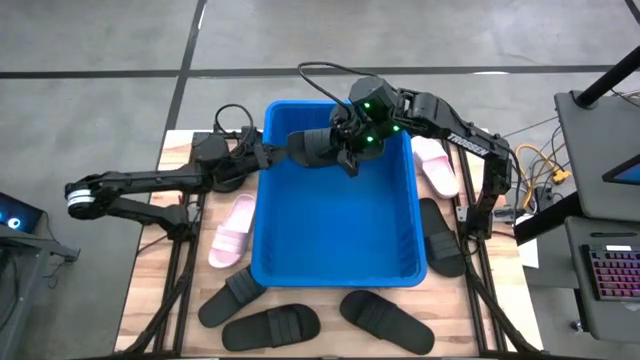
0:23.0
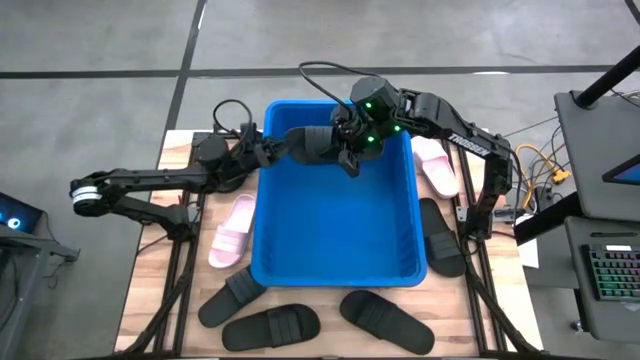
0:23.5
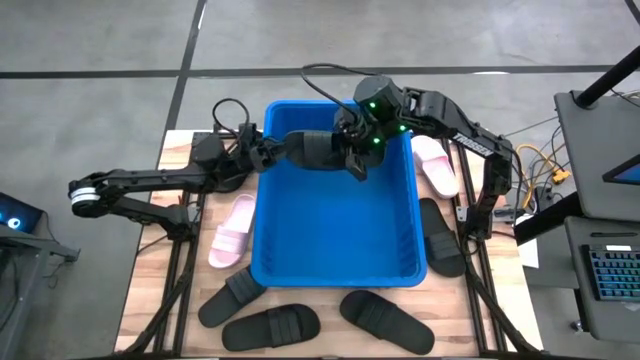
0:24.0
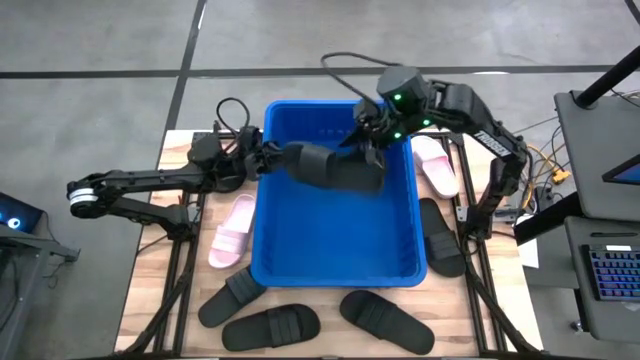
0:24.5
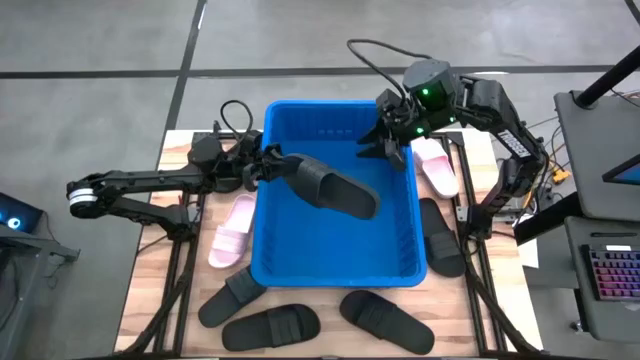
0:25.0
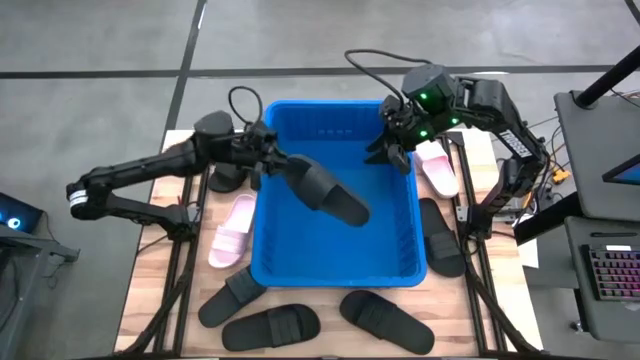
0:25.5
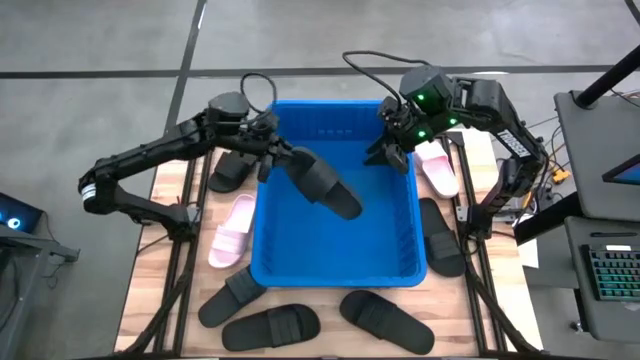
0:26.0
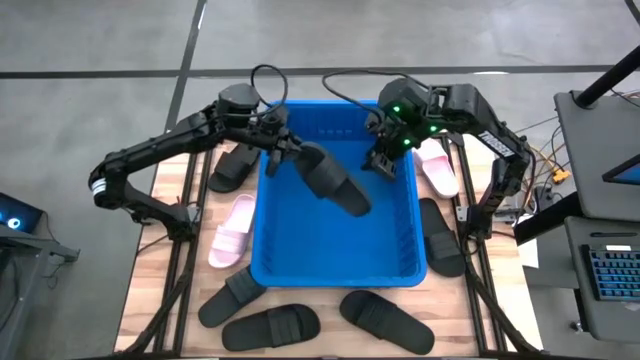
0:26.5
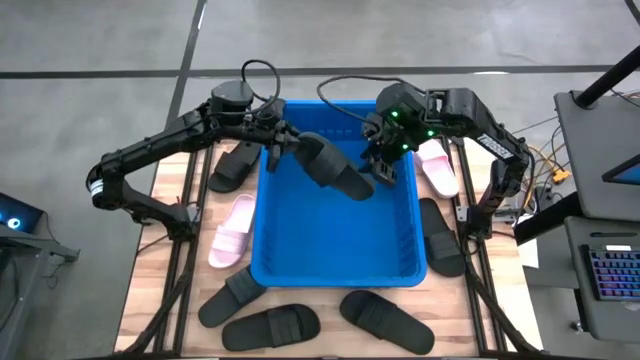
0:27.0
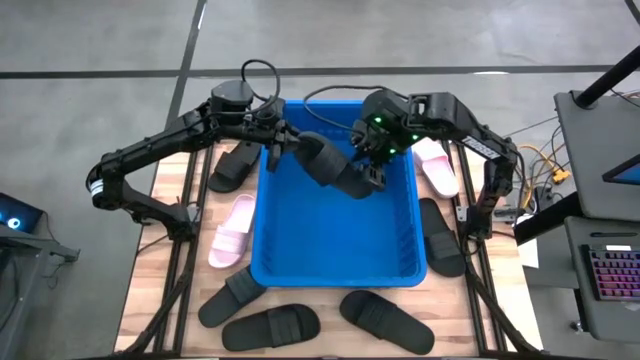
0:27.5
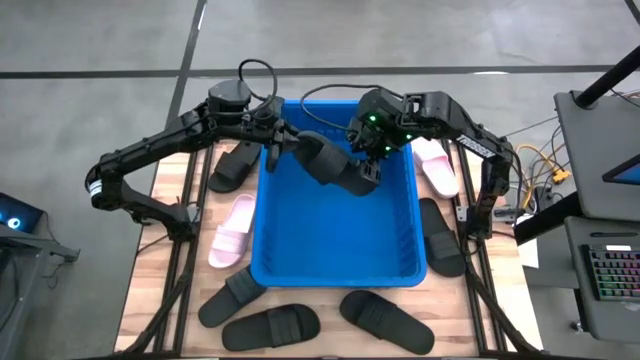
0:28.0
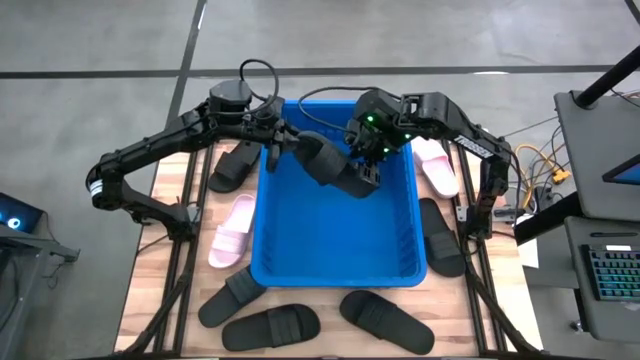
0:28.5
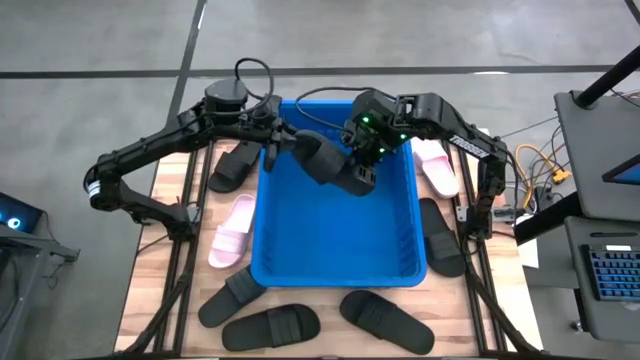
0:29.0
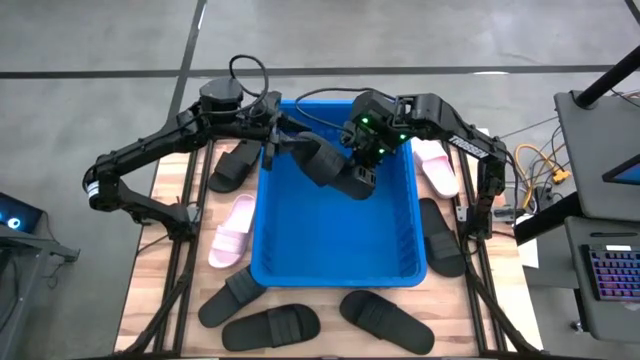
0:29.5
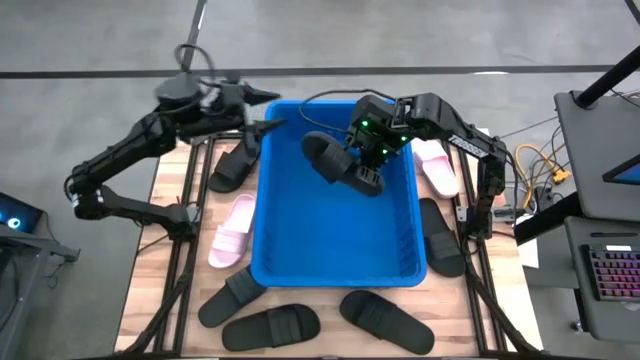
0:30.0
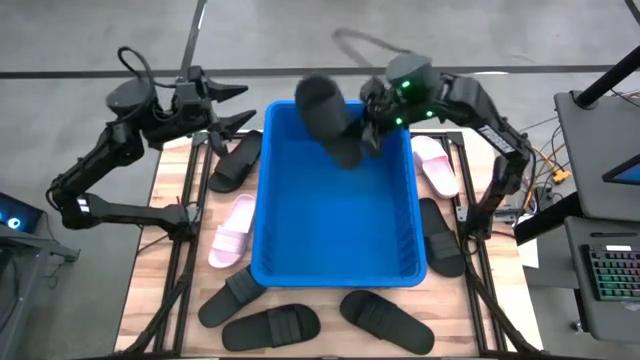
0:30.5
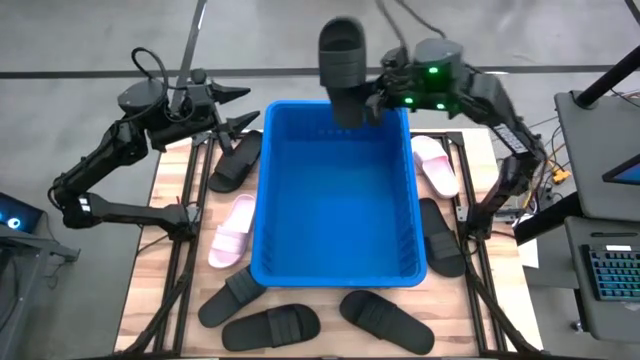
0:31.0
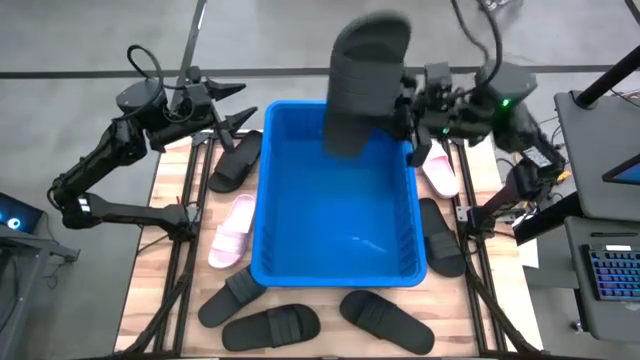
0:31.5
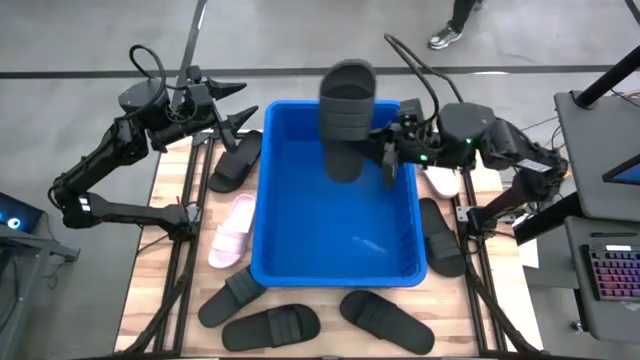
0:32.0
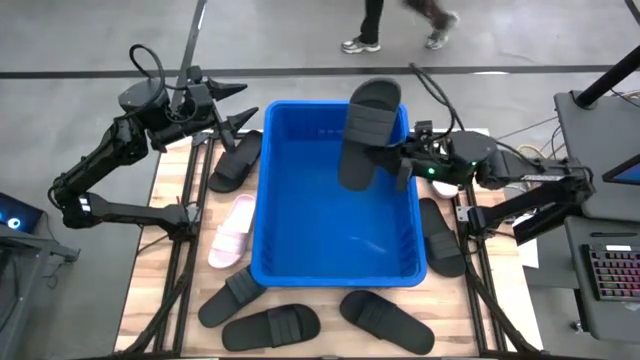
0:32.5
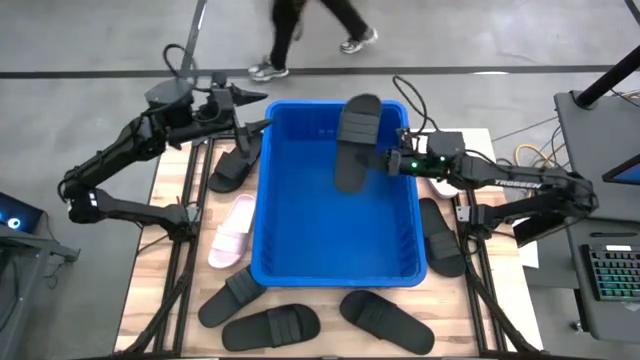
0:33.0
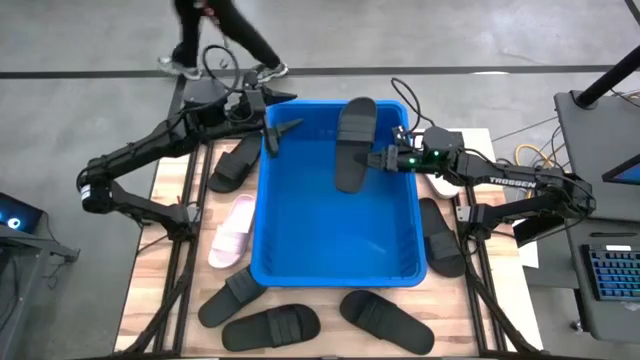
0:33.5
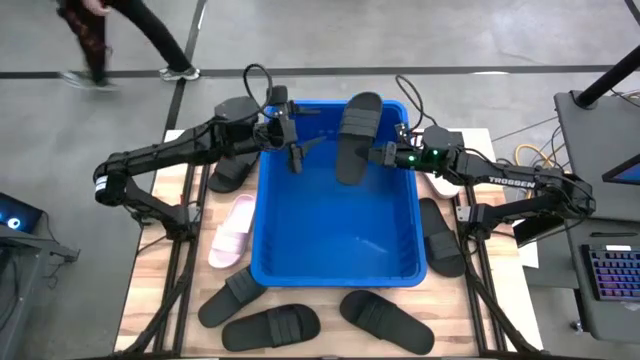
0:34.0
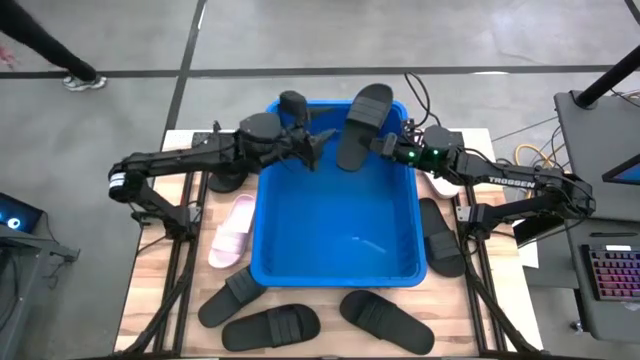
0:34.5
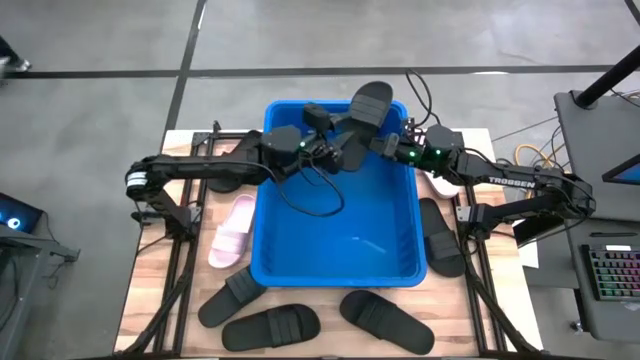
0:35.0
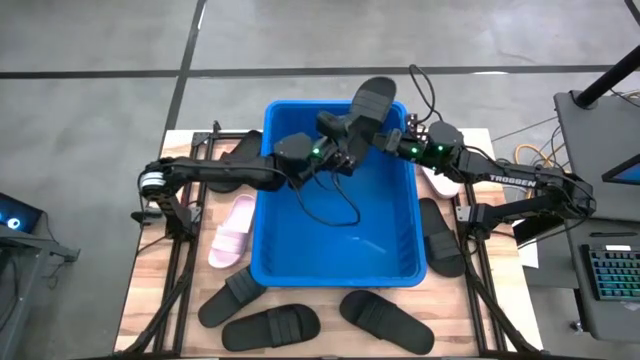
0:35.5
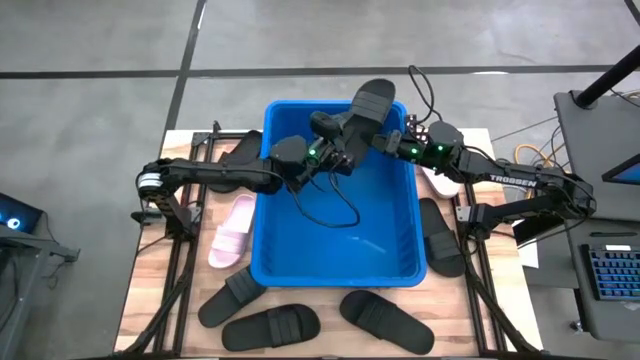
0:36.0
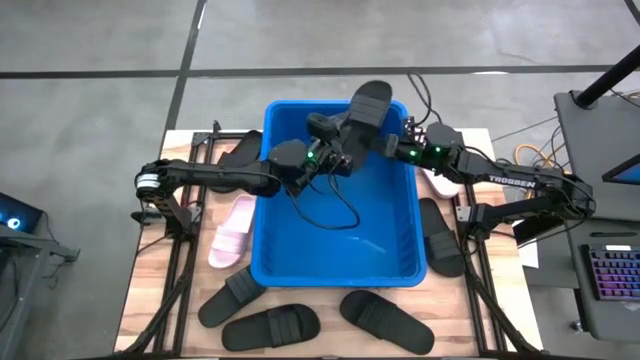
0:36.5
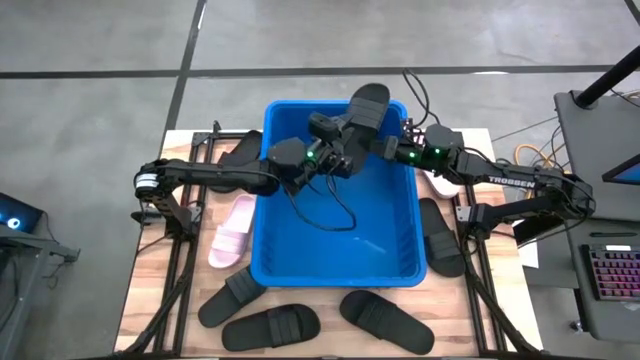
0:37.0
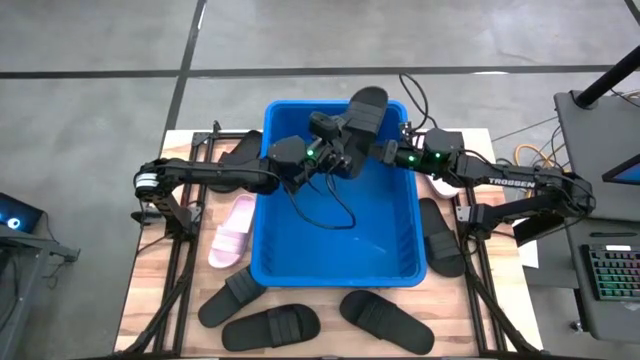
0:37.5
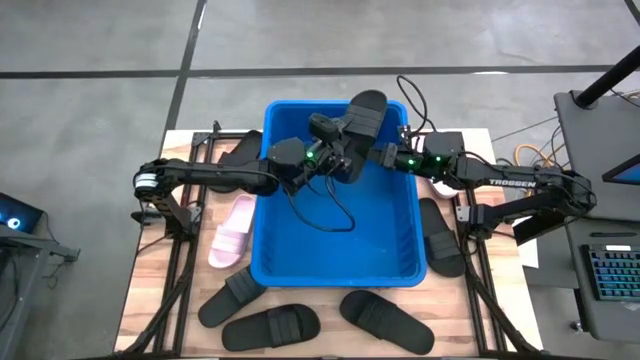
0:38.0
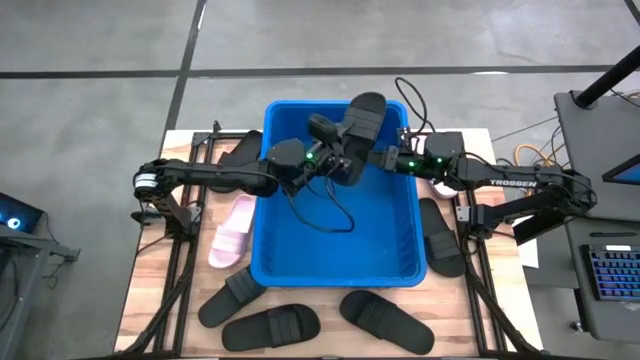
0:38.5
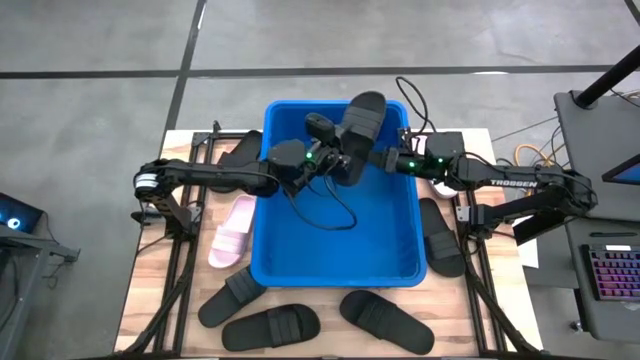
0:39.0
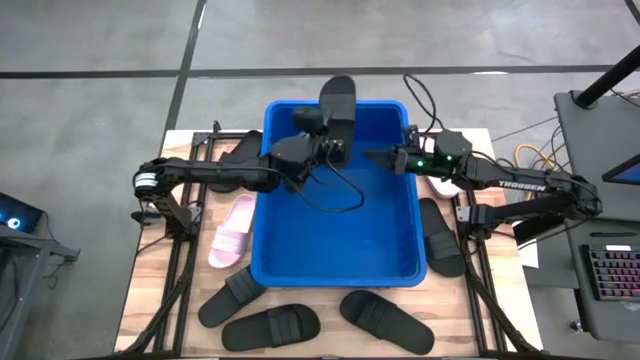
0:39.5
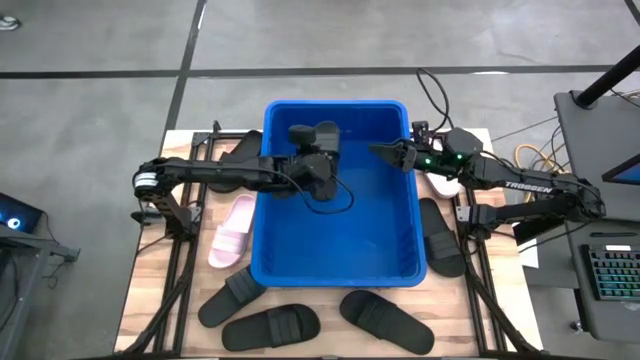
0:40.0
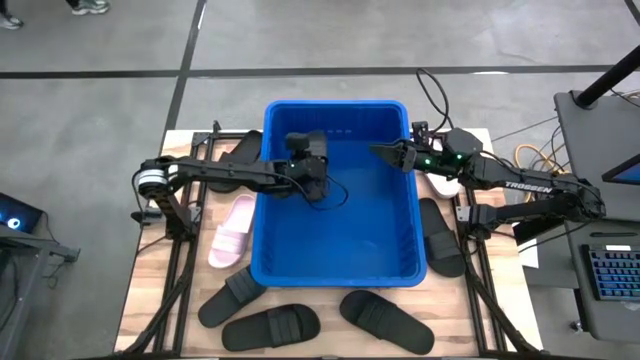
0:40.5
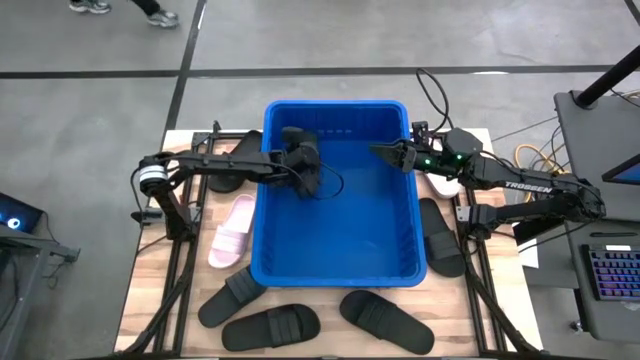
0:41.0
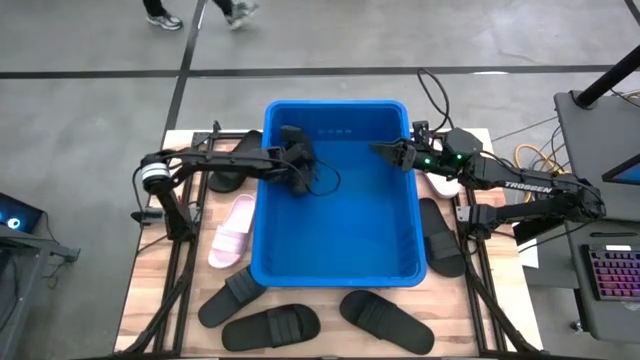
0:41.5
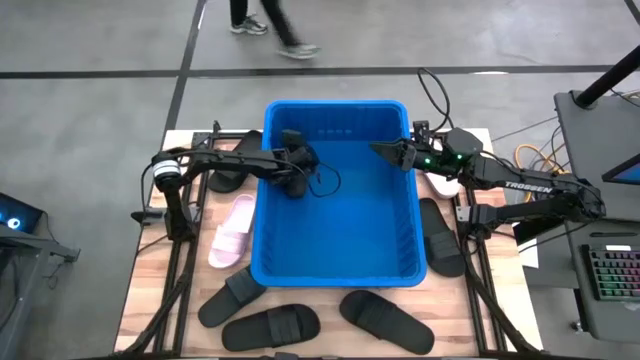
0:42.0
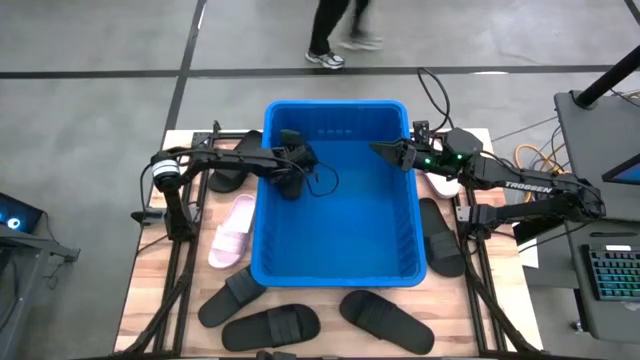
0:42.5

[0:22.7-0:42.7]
Task: Pick and place slides into bin
Put the black slide into the blue bin

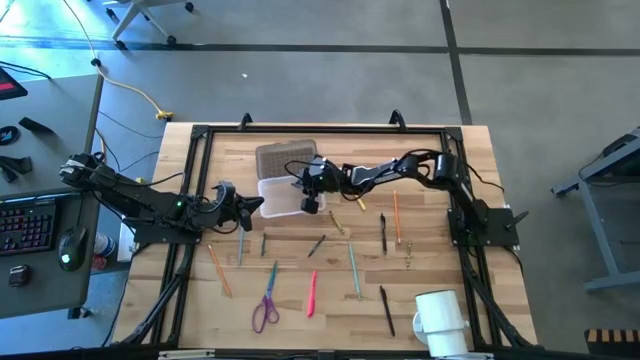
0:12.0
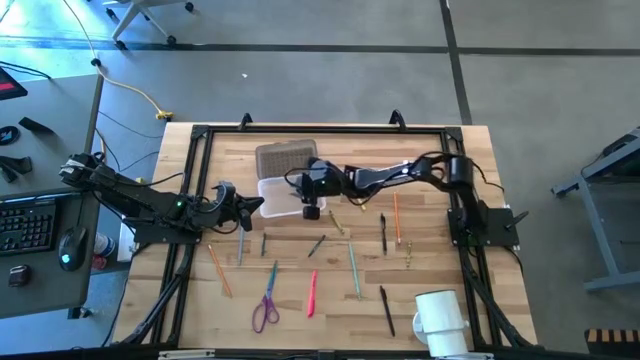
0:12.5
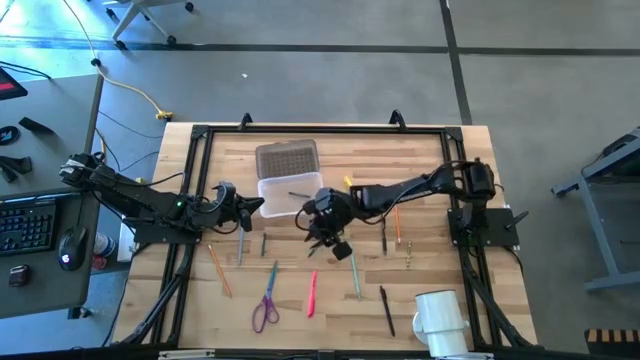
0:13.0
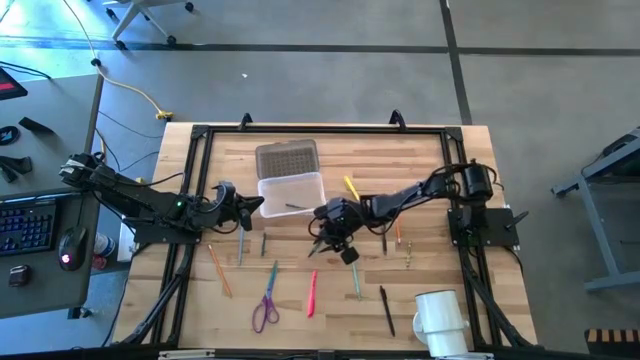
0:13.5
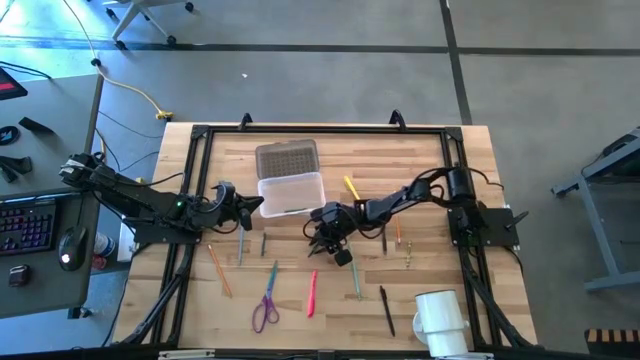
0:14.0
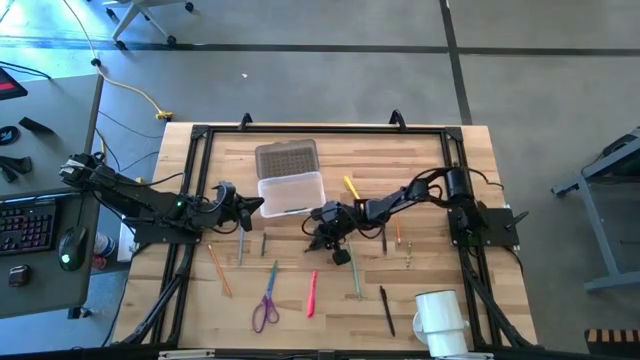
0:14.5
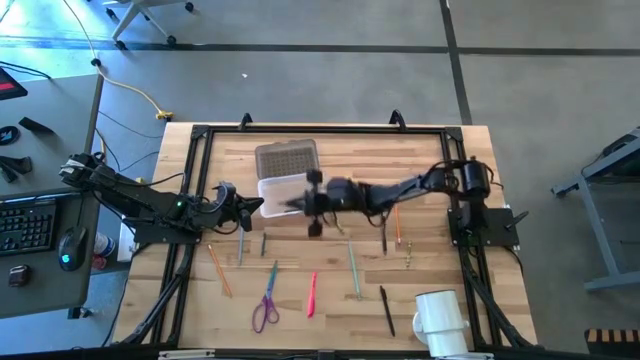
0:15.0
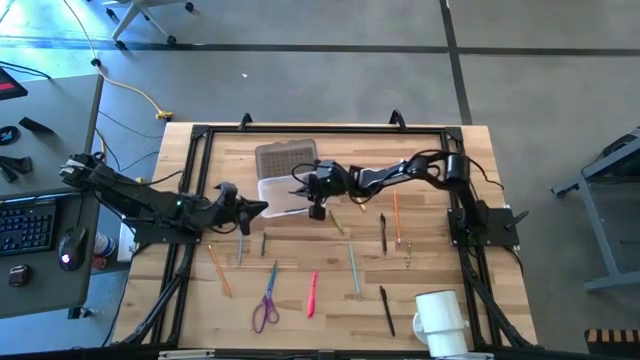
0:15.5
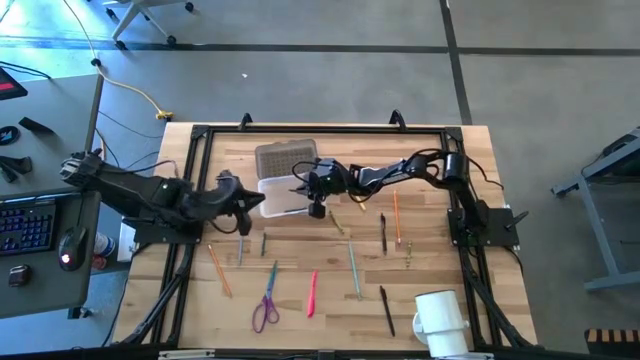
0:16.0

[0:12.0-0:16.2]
Task: Pick & place school supplies into a supply box
Put the right dark green crayon into the transparent supply box
